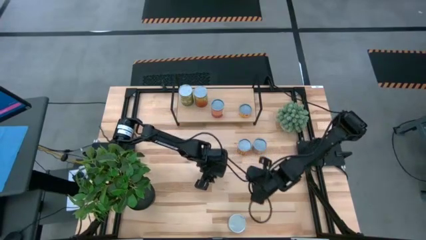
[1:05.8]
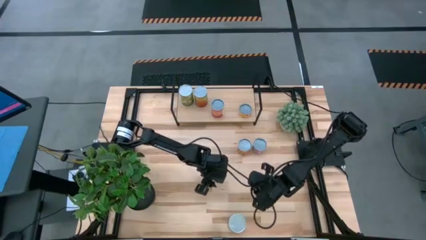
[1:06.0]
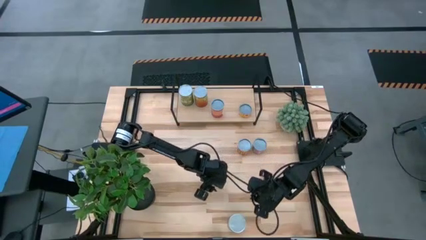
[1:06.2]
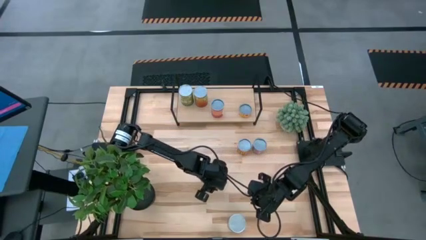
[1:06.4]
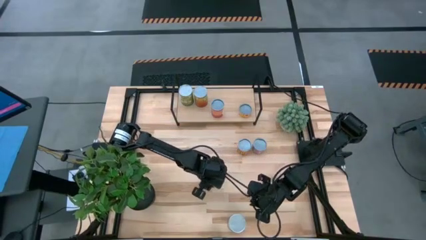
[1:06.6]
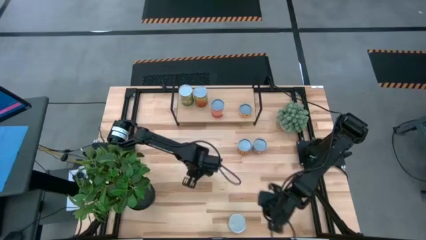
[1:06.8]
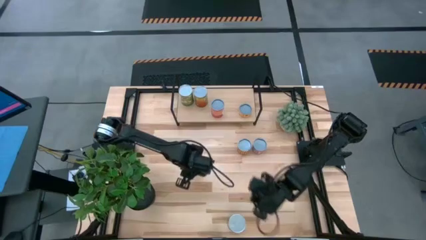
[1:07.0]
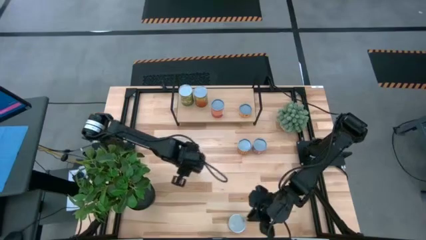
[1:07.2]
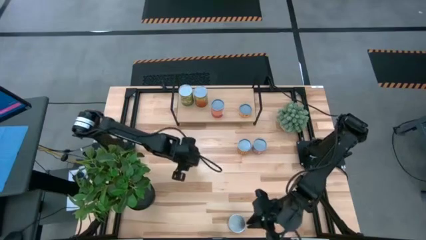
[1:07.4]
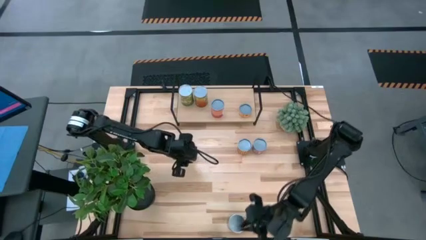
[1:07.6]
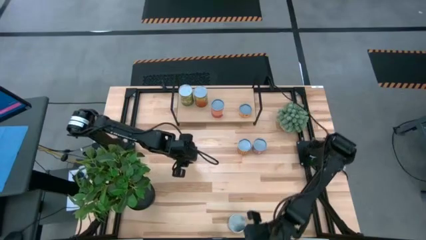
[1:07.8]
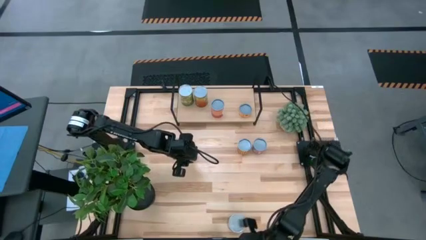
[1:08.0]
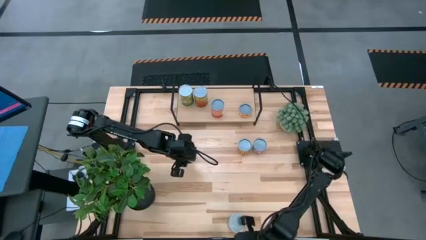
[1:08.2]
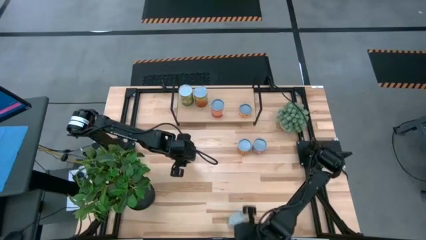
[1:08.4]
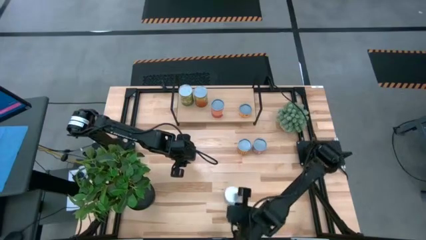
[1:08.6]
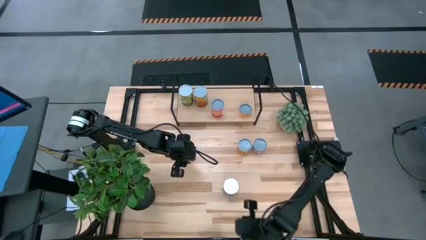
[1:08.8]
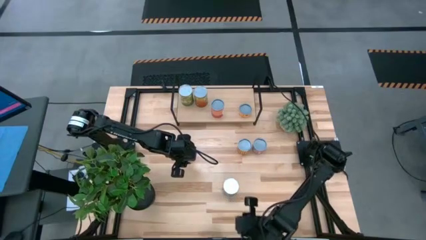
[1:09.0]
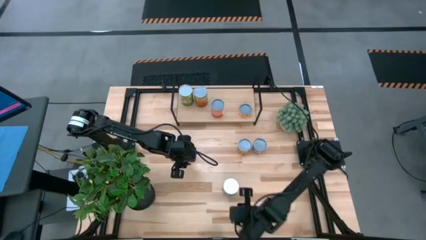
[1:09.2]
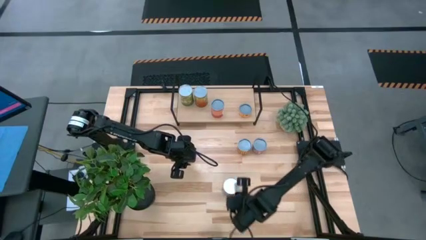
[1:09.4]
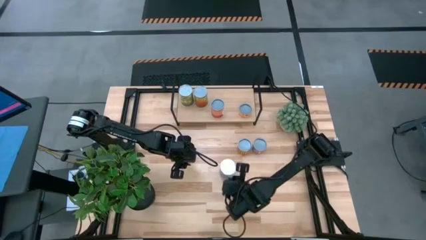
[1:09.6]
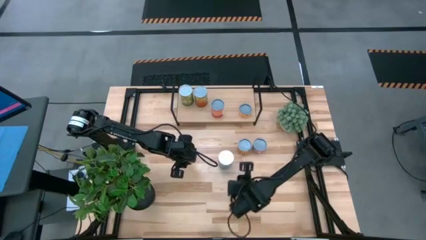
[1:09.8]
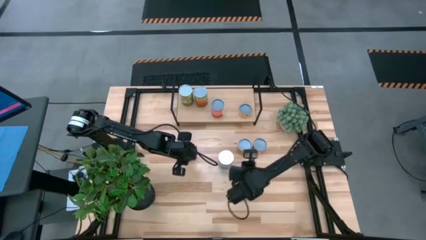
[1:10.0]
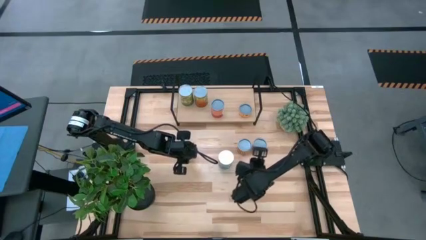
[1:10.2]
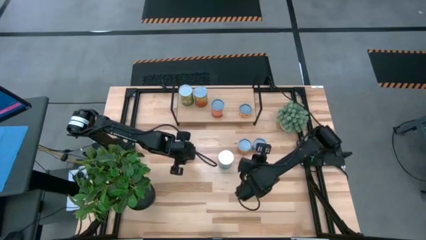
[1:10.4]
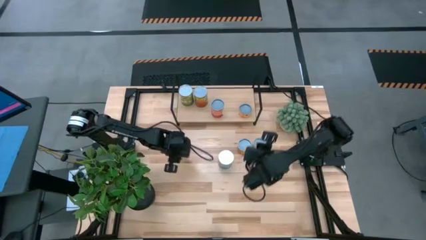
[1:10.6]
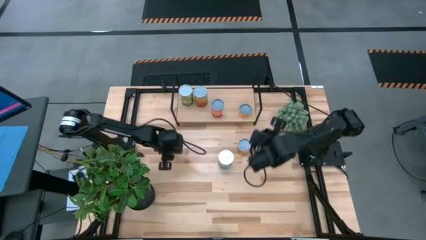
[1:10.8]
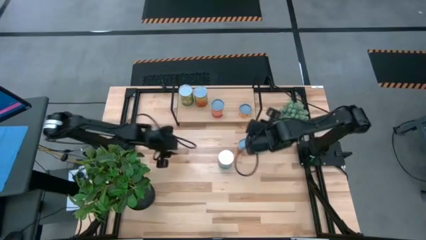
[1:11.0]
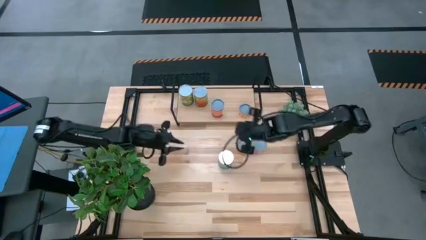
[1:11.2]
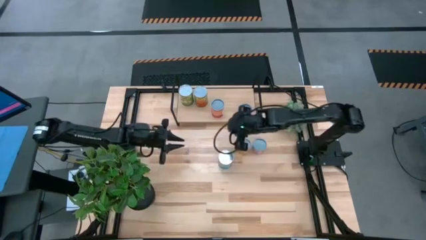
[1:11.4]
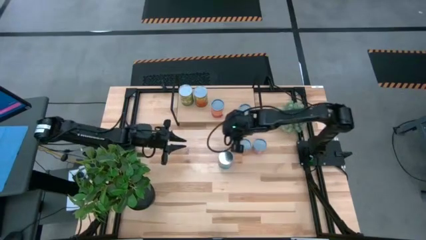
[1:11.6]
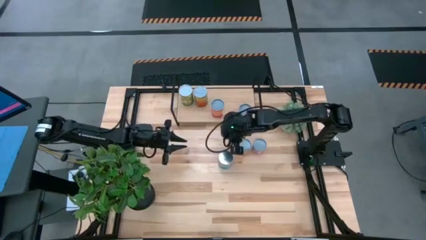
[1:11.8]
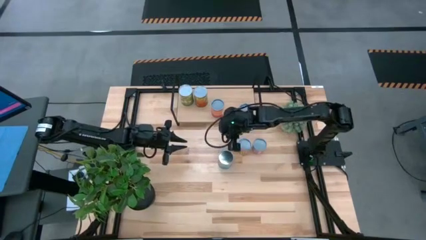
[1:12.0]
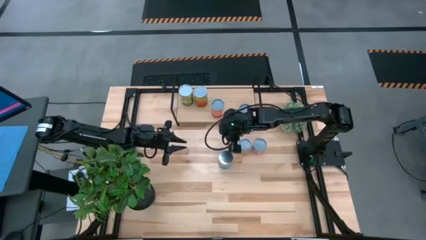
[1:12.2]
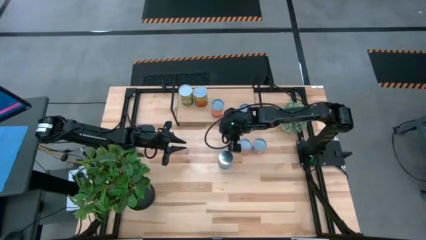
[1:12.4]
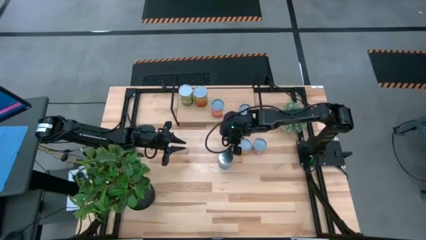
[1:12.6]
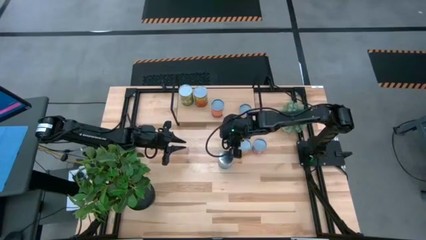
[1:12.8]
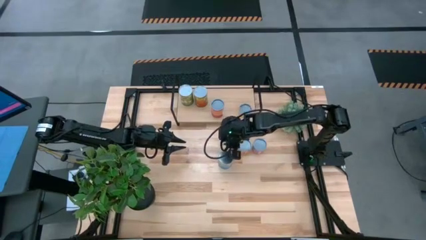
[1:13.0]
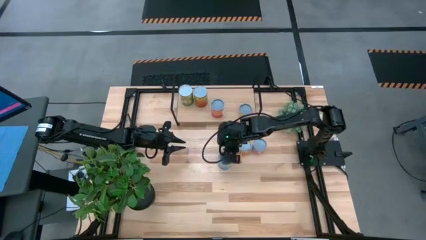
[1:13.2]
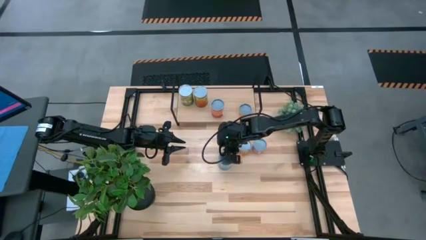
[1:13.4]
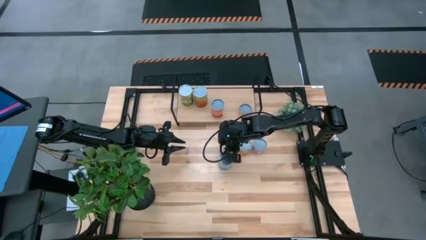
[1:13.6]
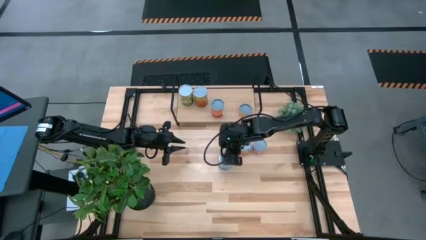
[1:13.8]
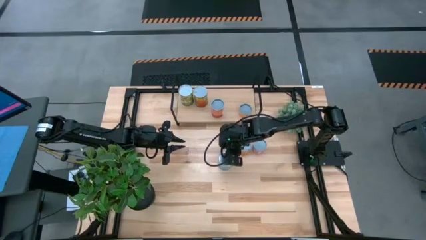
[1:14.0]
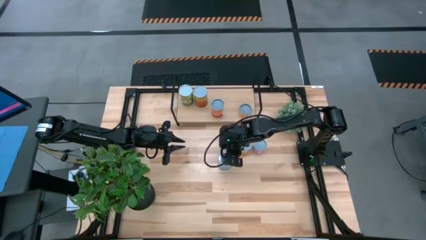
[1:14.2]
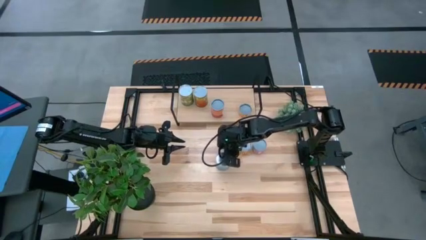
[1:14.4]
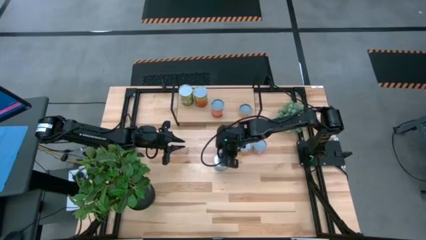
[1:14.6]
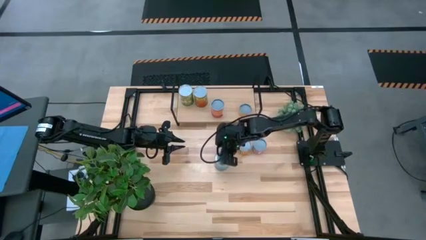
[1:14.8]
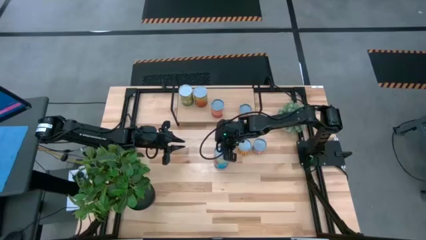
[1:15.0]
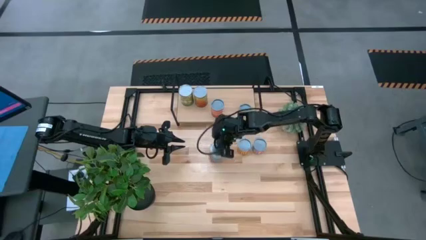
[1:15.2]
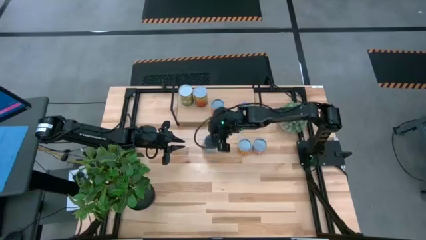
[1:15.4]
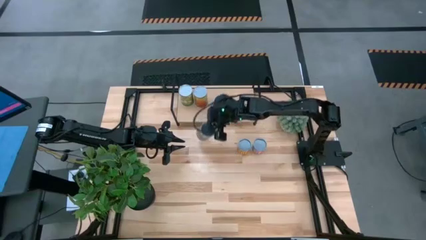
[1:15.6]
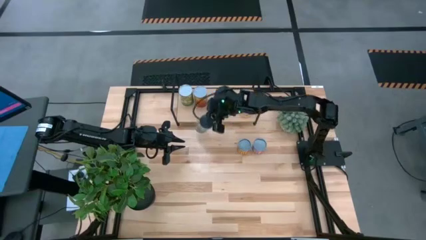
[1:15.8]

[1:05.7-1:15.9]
Task: Pick and place cans onto a shelf
Put the canned tomatoes on the shelf
